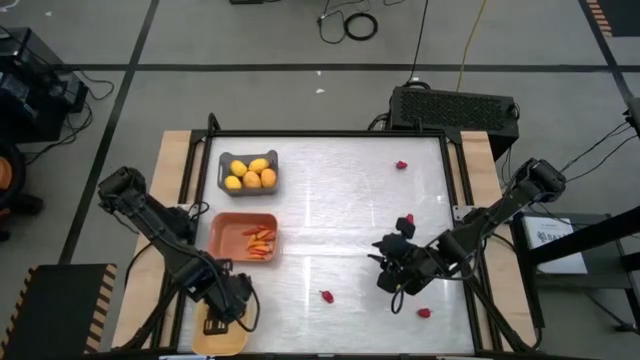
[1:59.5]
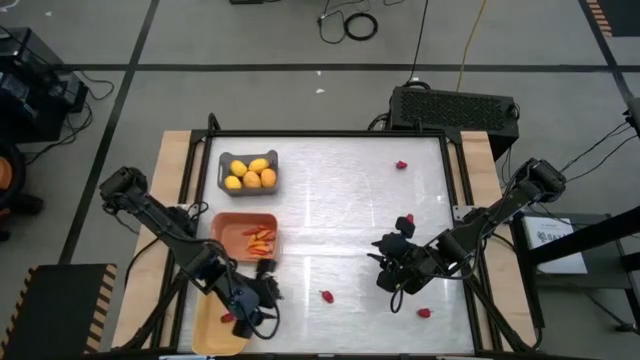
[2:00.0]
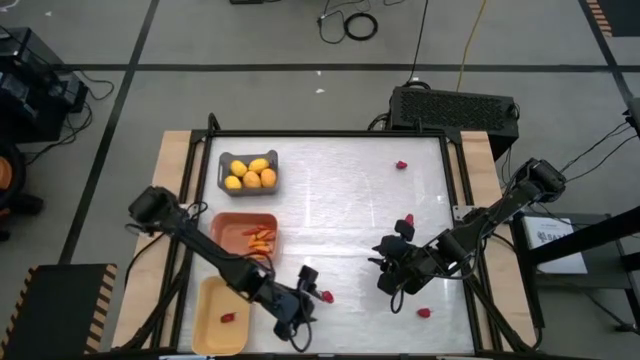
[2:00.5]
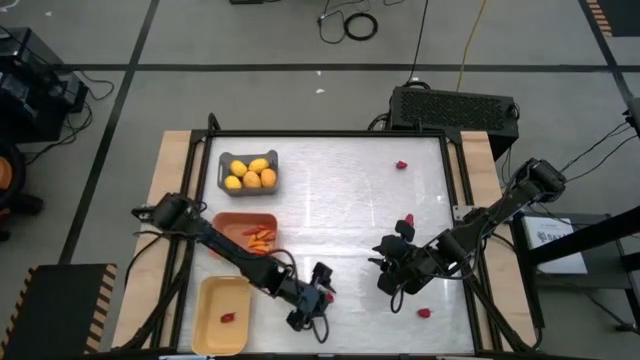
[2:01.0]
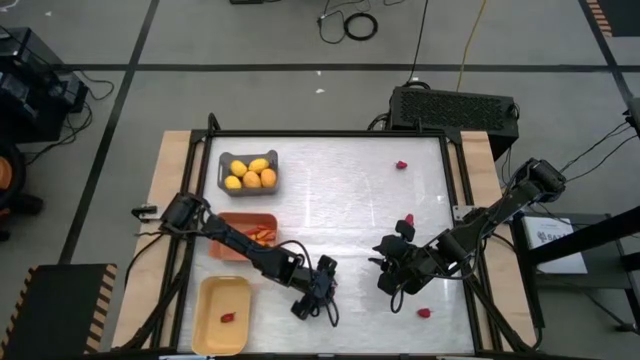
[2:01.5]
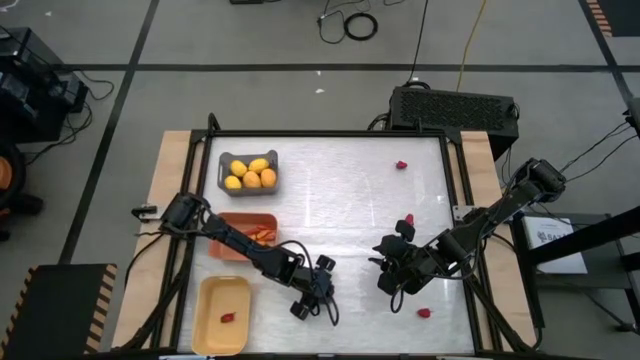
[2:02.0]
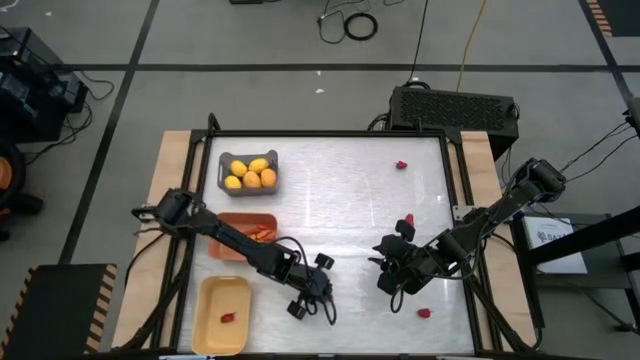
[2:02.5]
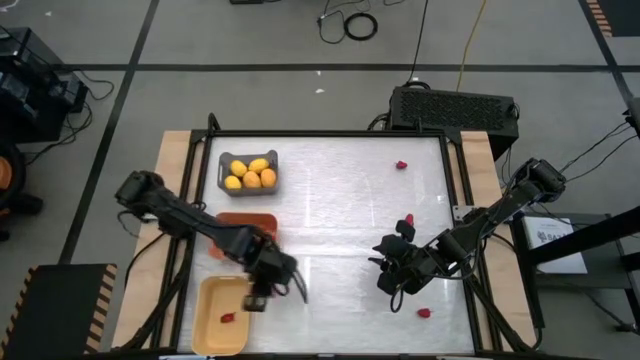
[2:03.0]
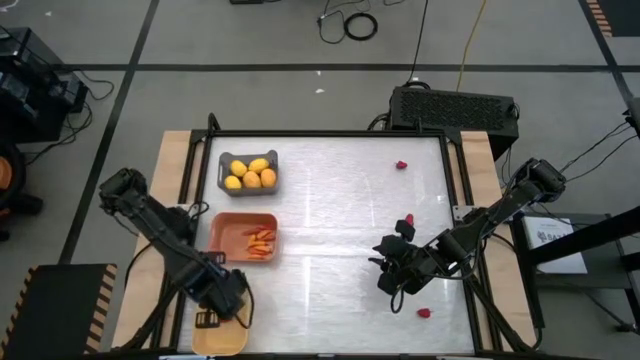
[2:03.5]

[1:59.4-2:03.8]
Task: Sort produce into baskets
Put the red chili pepper into the yellow bin

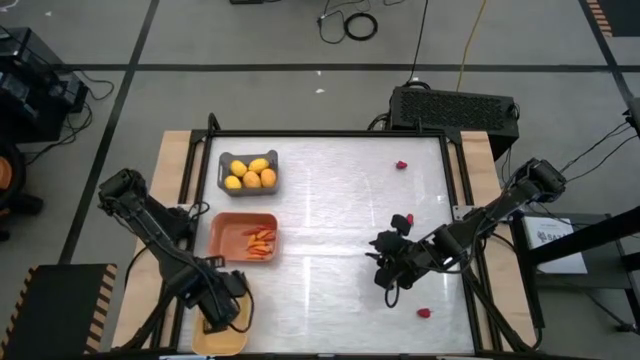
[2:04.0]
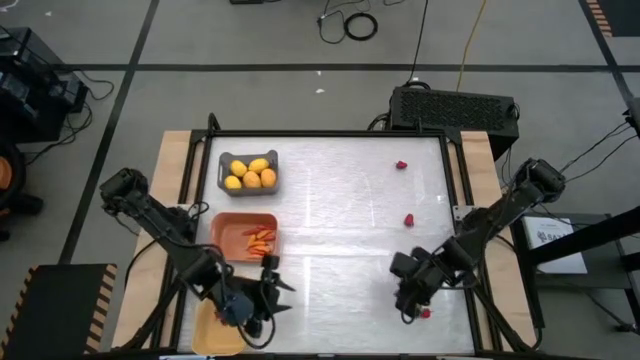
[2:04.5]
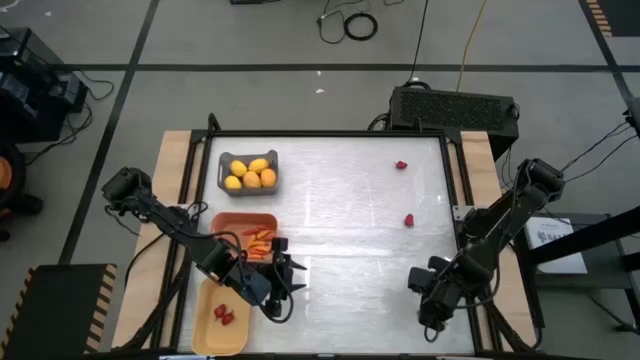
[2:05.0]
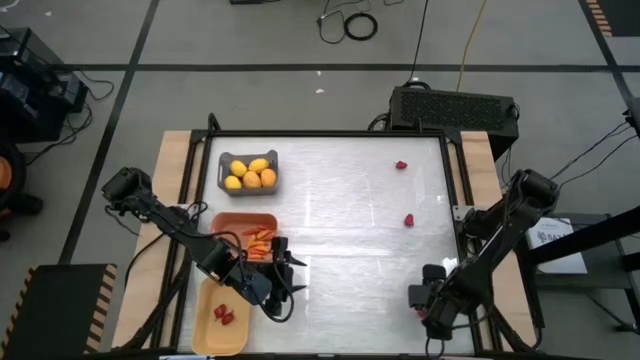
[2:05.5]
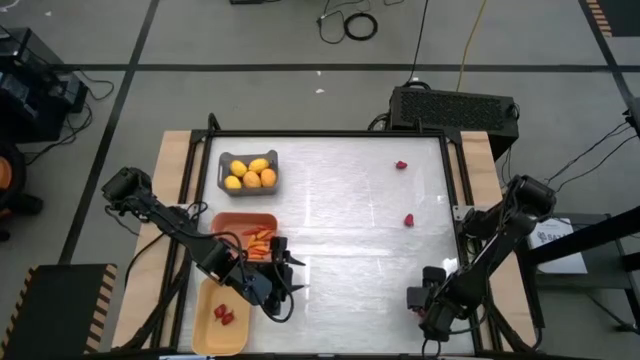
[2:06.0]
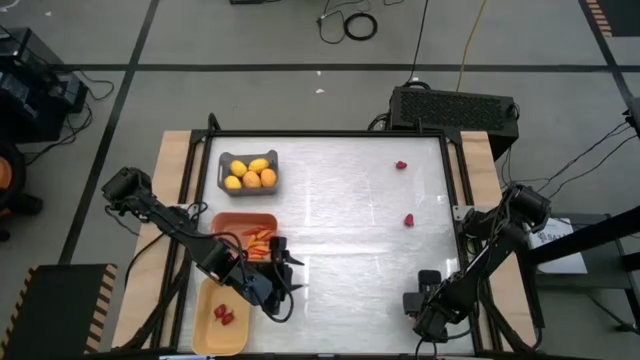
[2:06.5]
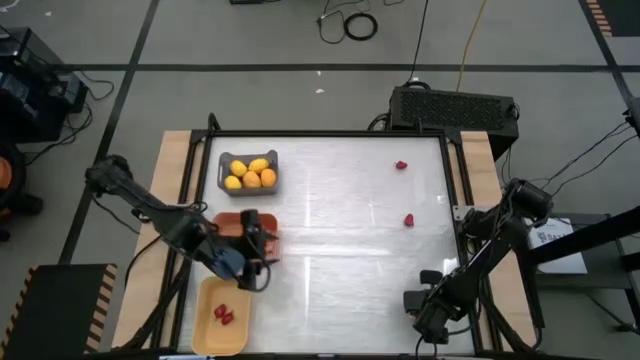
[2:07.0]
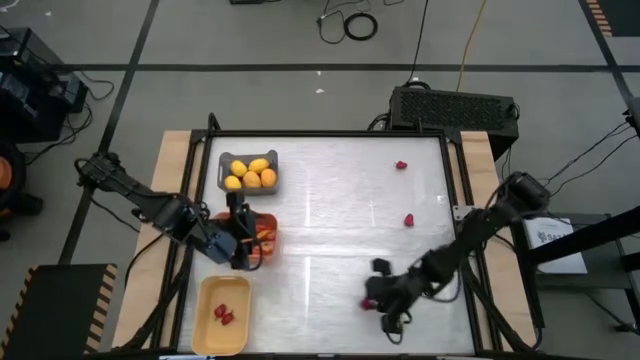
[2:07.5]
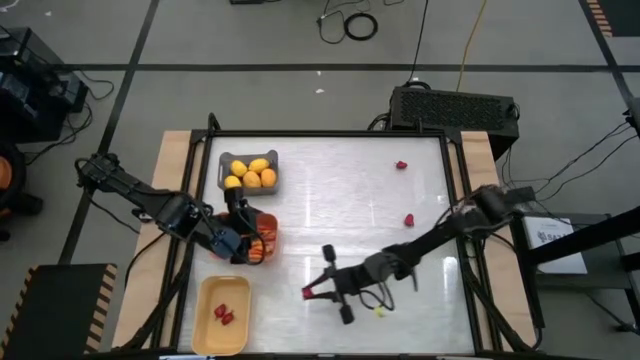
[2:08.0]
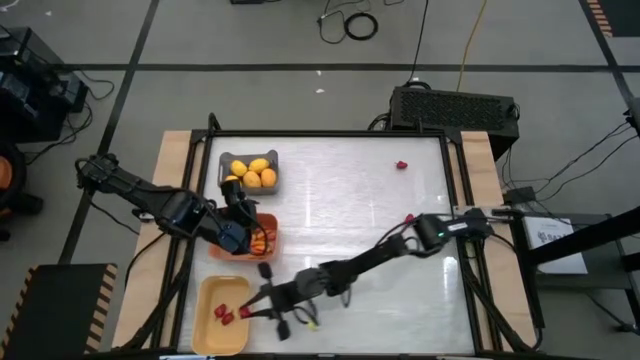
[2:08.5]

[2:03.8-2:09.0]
Put the red chili pepper into the yellow bin

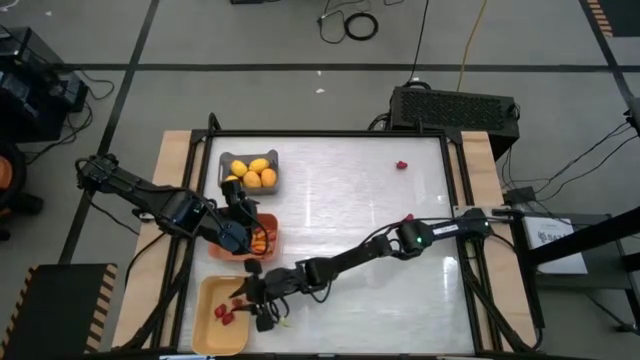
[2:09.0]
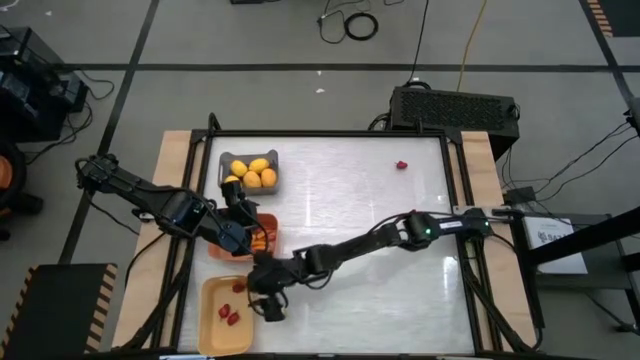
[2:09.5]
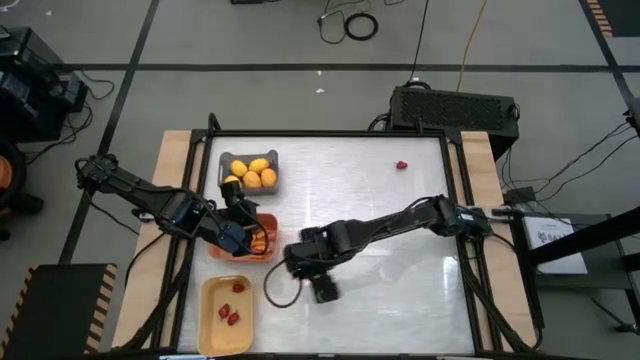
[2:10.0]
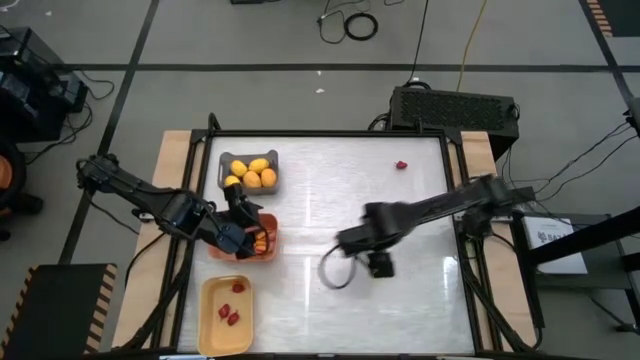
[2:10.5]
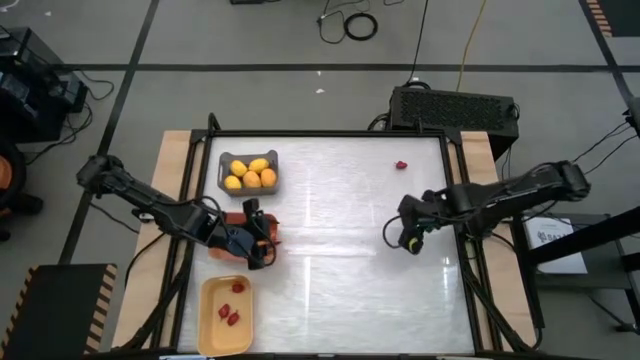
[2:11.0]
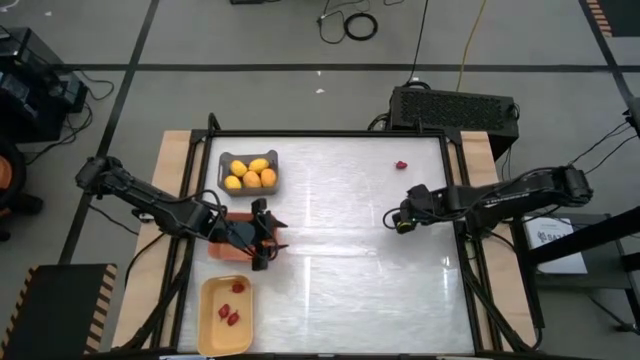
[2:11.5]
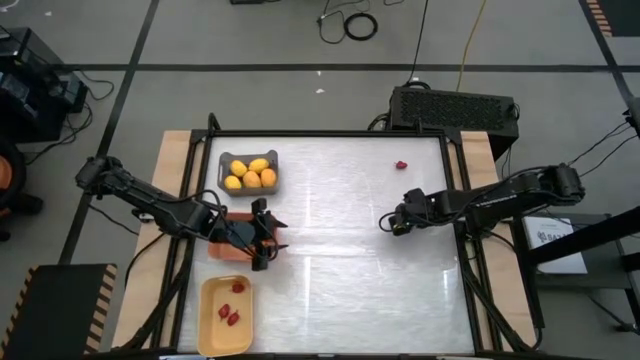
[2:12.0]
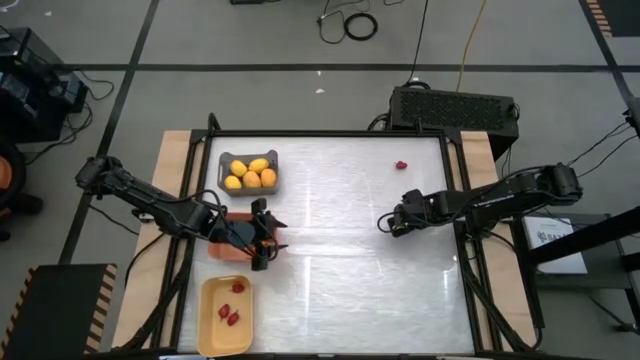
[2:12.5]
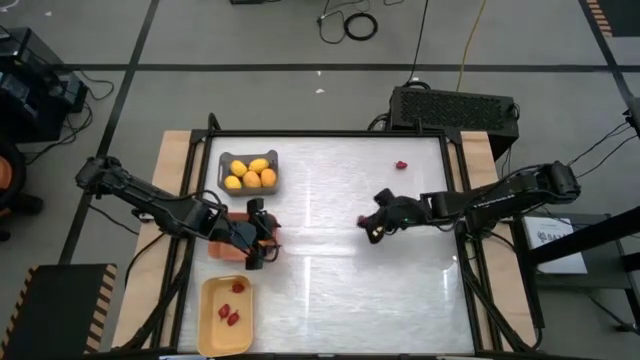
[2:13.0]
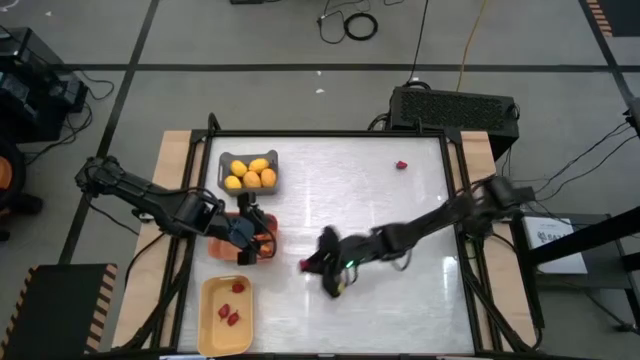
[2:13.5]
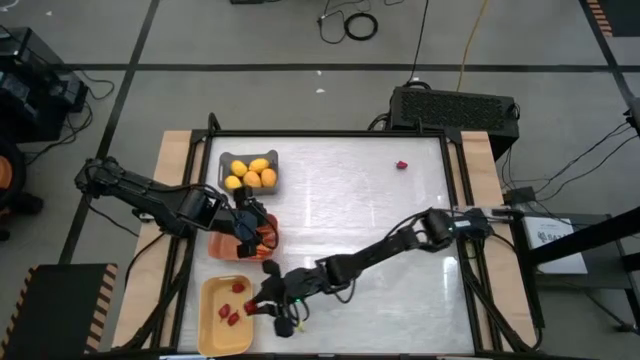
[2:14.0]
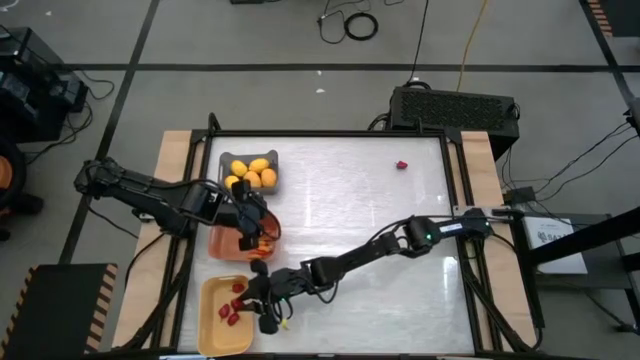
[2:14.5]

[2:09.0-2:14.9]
Put the red chili pepper into the yellow bin

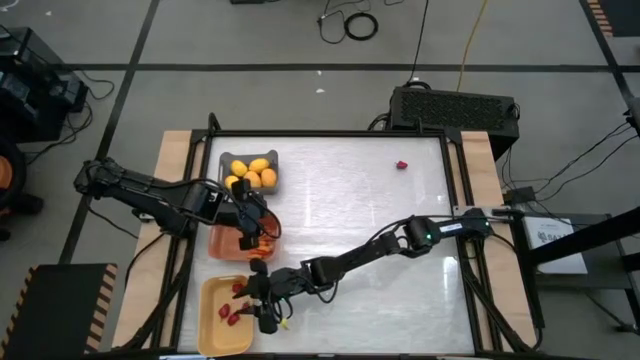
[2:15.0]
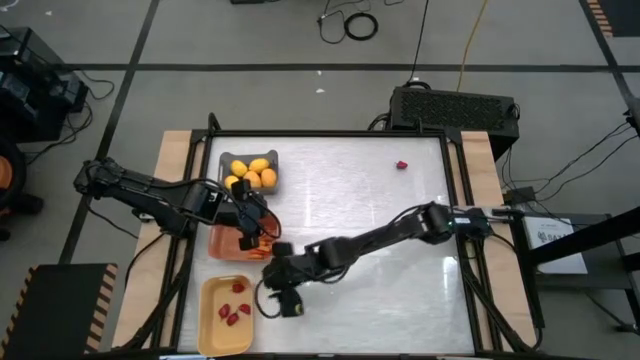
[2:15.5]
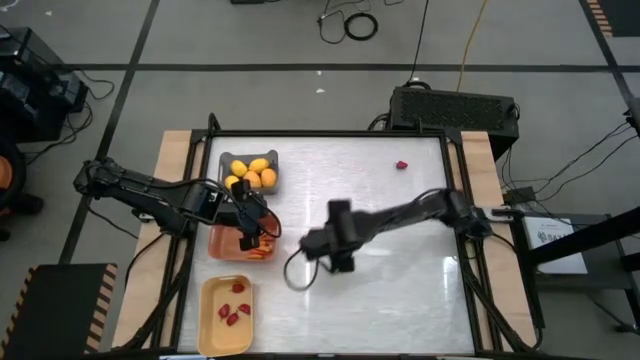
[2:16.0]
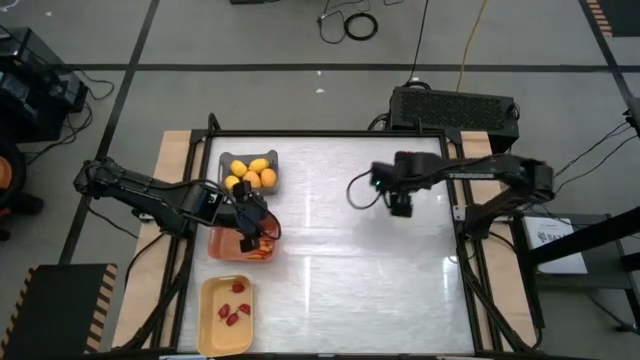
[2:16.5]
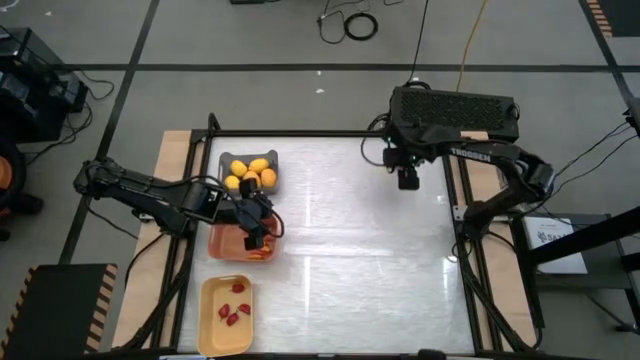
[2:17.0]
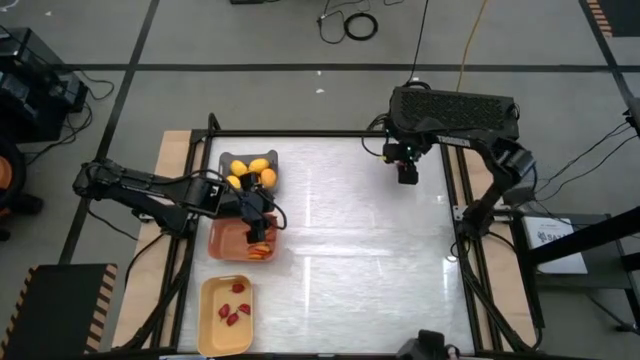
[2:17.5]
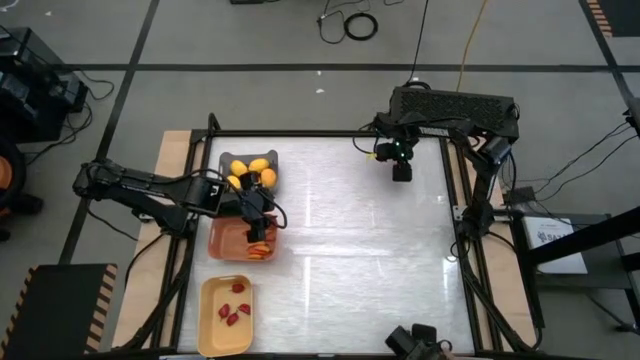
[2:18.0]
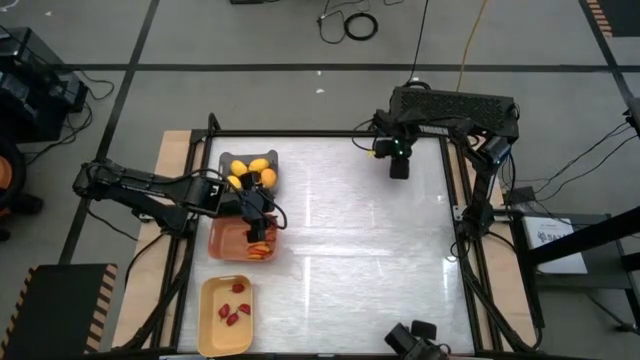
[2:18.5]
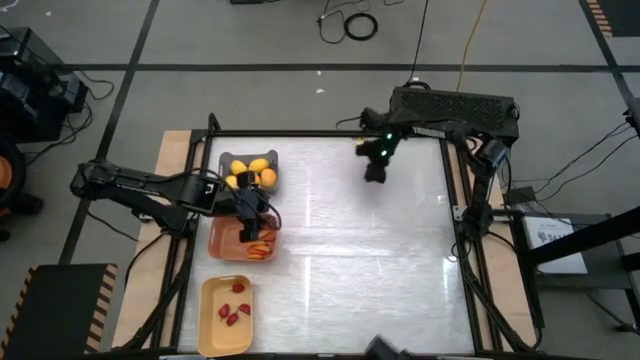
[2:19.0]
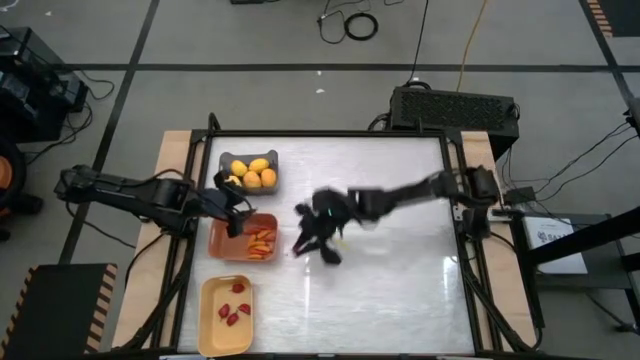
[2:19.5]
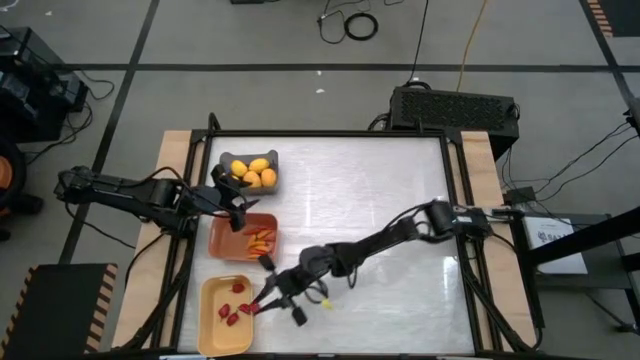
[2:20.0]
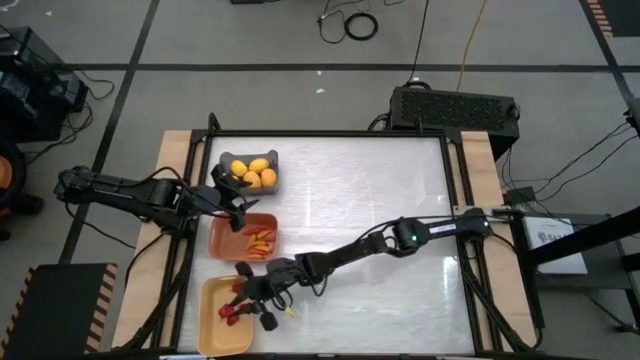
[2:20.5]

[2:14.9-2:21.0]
Put the red chili pepper into the yellow bin
